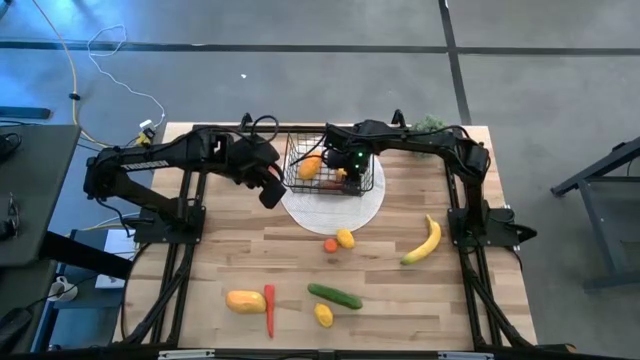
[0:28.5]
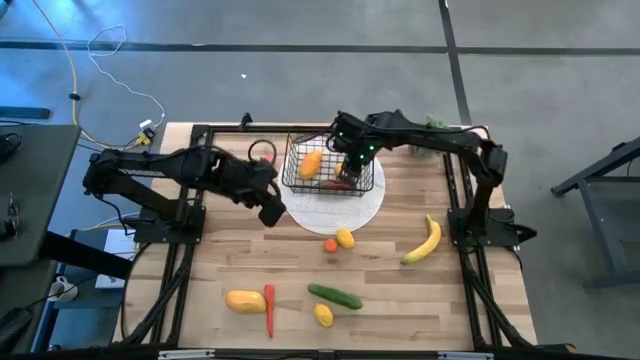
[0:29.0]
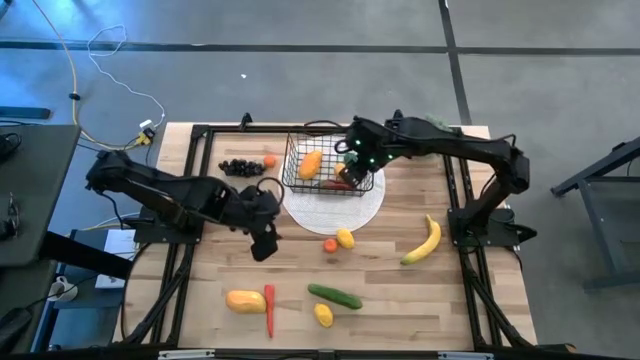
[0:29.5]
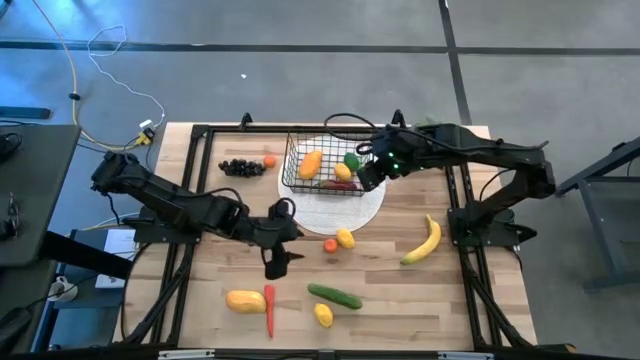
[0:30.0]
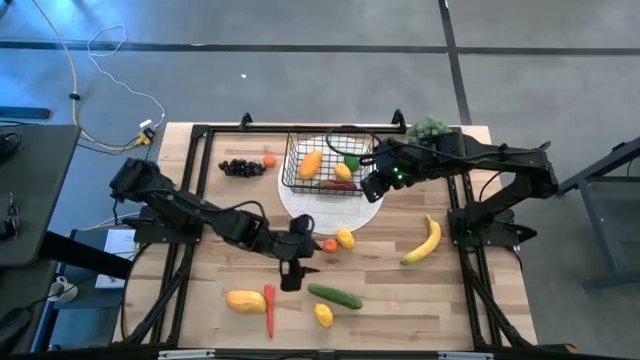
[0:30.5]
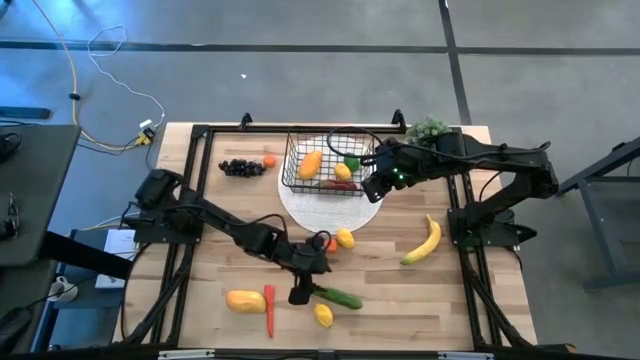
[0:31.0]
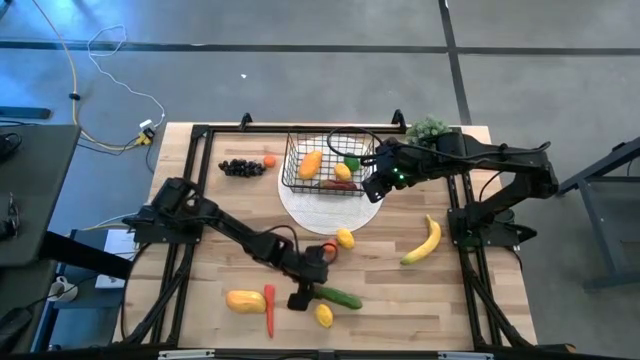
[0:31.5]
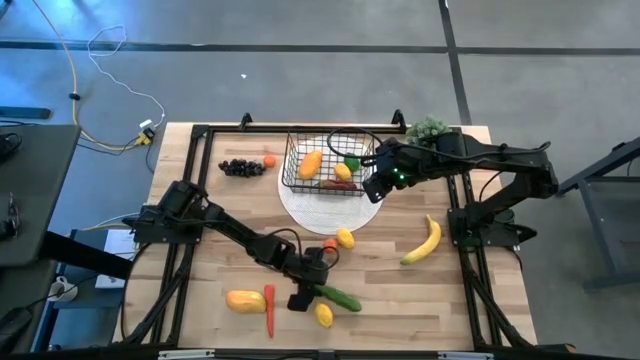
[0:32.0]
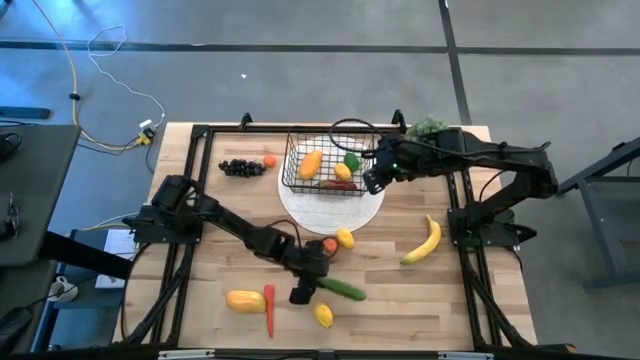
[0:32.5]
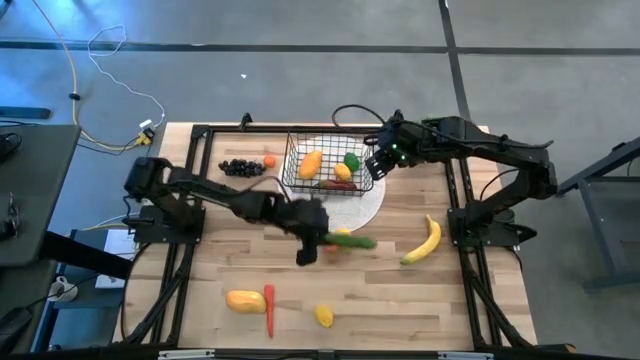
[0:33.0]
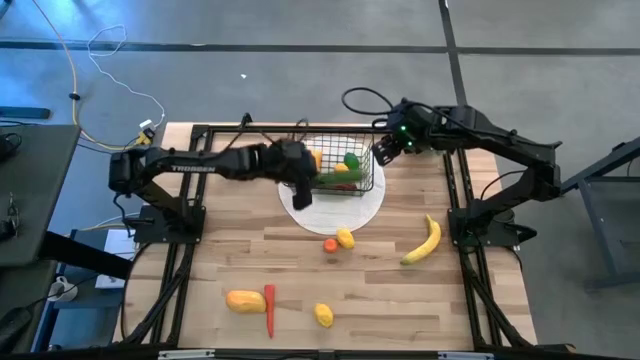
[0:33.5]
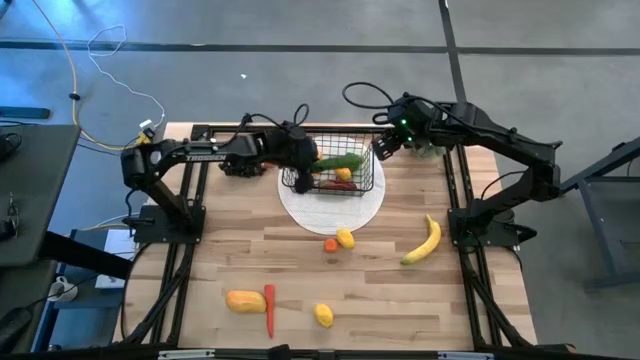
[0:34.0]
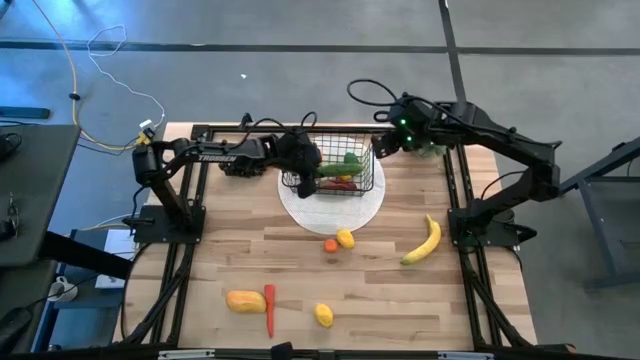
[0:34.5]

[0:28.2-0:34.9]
Task: Build produce basket
Put the green cucumber into the wire basket

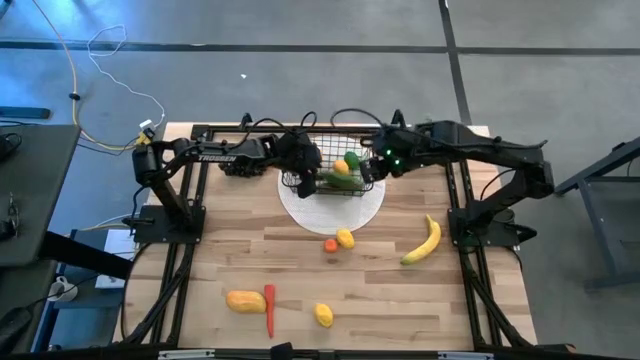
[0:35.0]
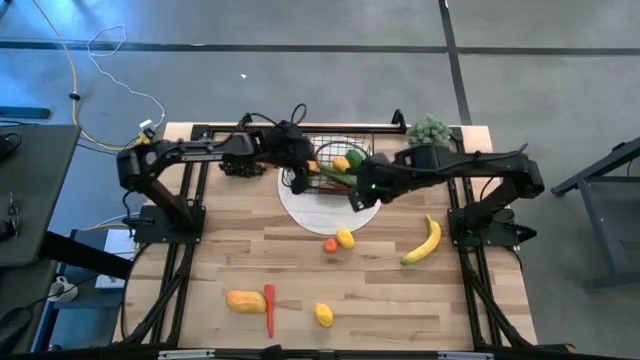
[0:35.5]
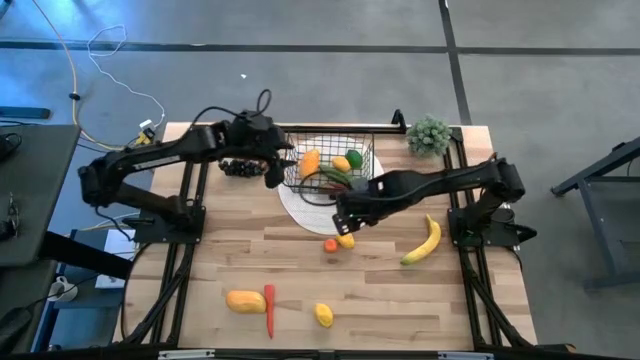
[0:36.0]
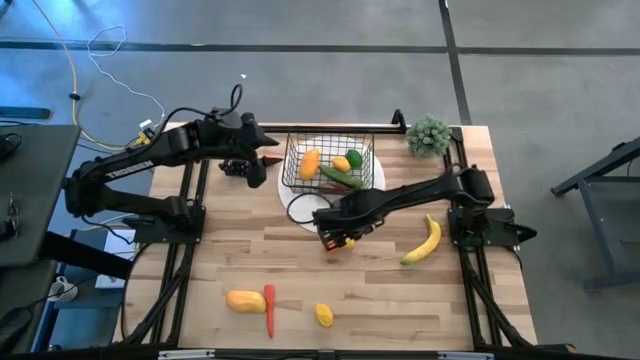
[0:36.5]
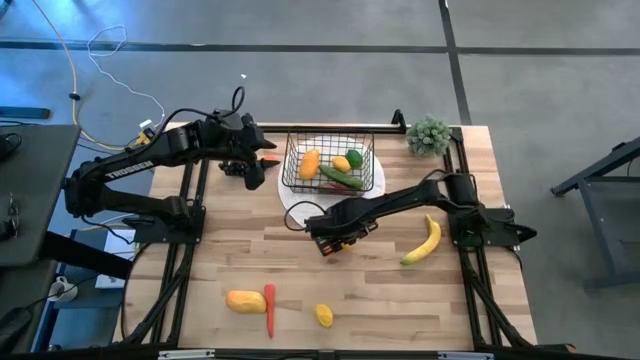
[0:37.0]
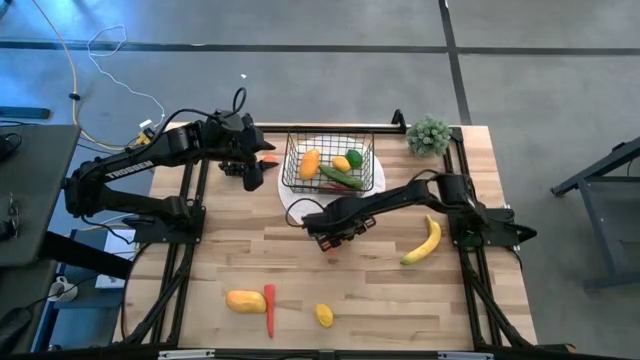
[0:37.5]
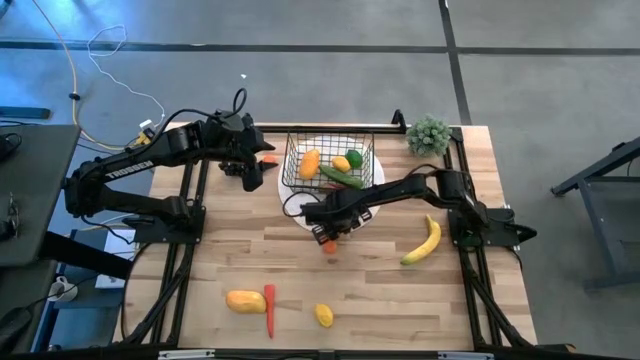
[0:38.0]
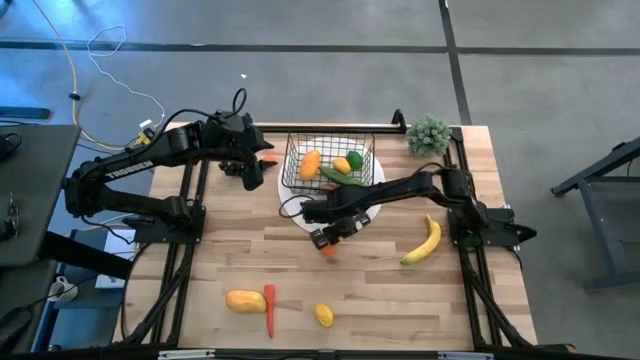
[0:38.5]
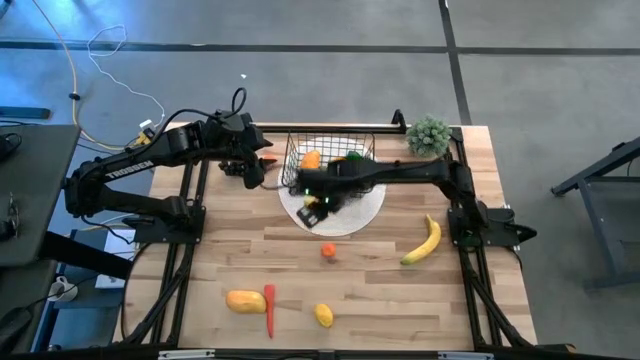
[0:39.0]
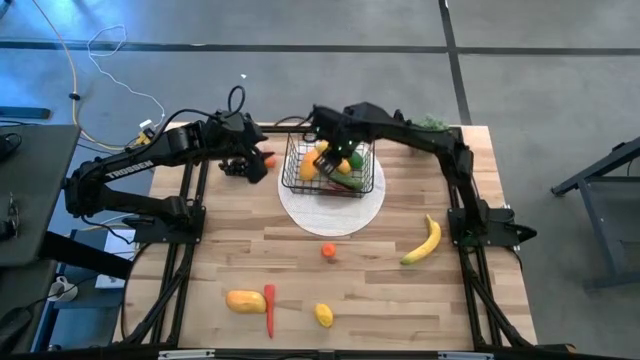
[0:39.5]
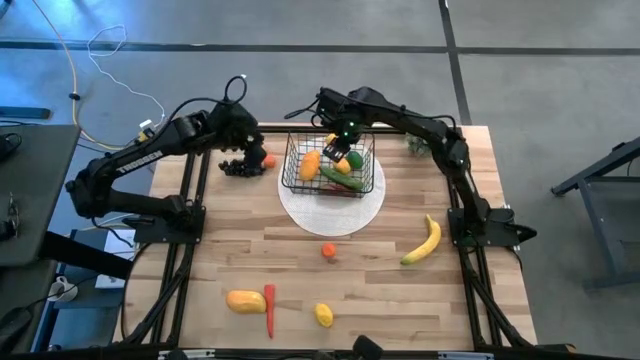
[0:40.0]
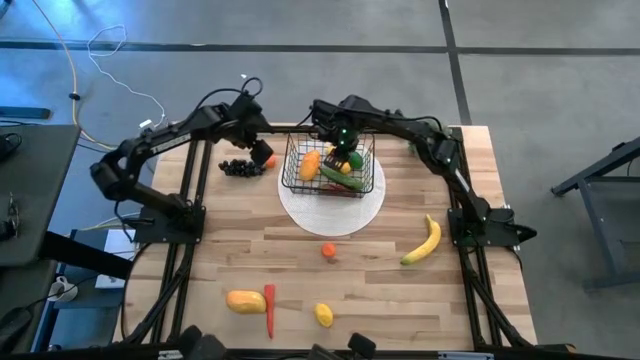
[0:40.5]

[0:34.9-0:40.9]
Put the top yellow lemon into the wire basket

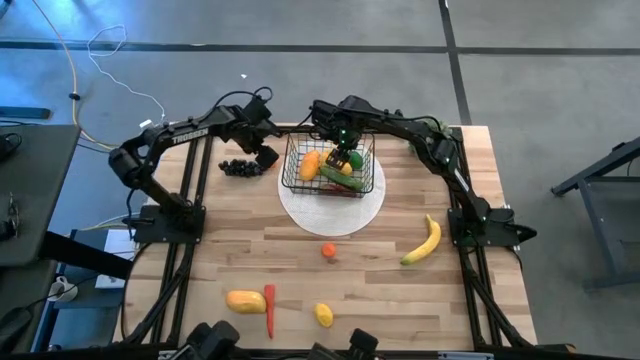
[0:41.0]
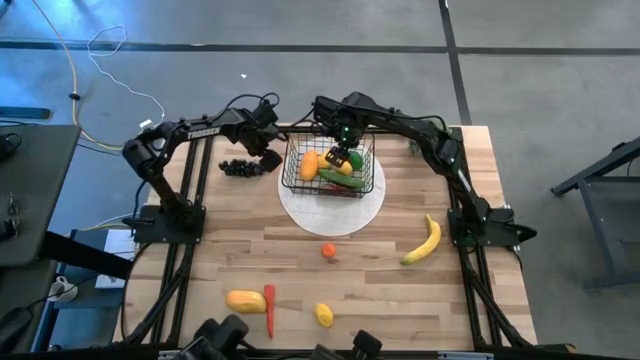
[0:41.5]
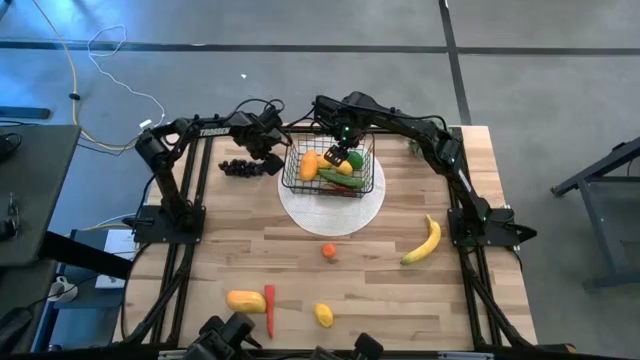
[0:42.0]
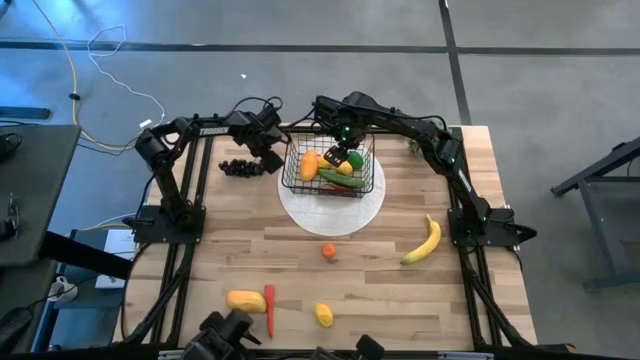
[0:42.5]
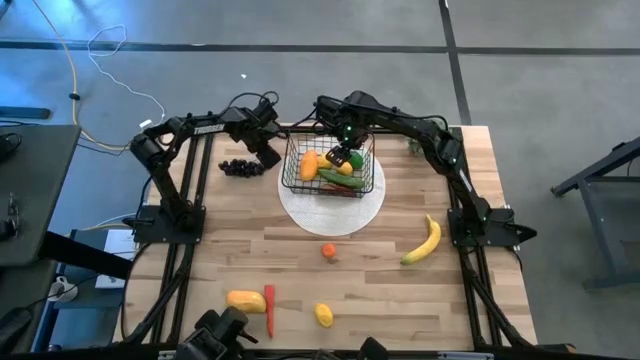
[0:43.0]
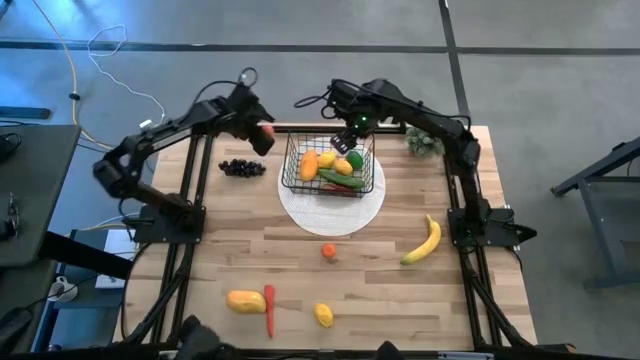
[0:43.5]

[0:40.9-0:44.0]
Put the top orange into the wire basket

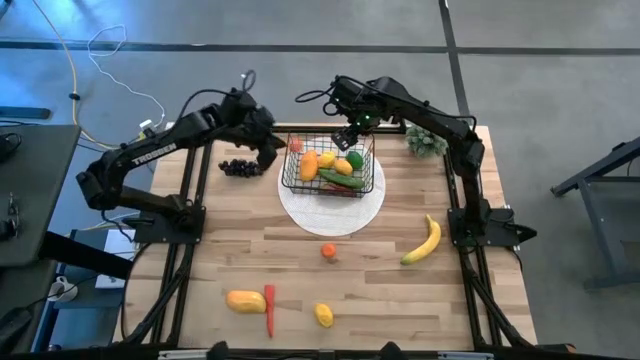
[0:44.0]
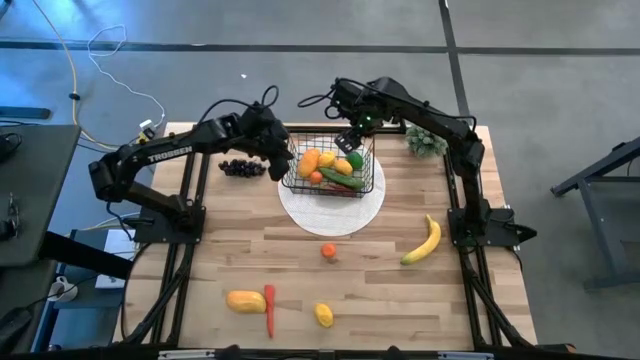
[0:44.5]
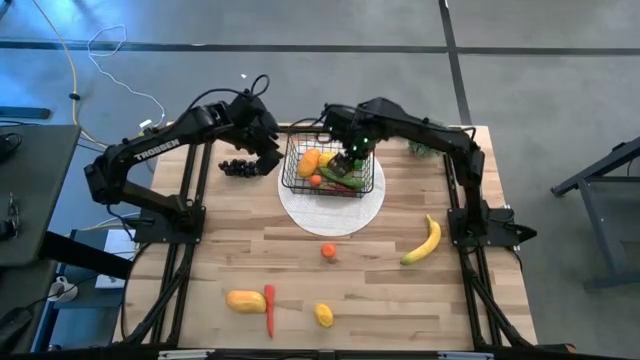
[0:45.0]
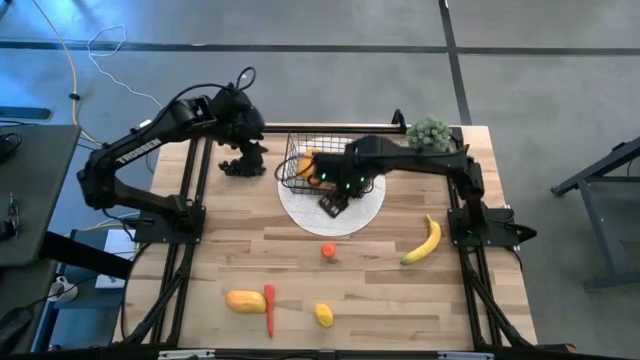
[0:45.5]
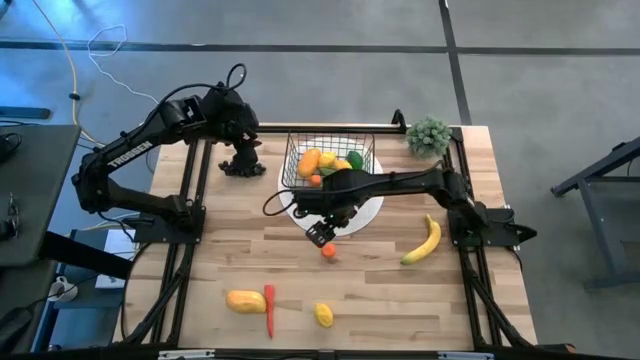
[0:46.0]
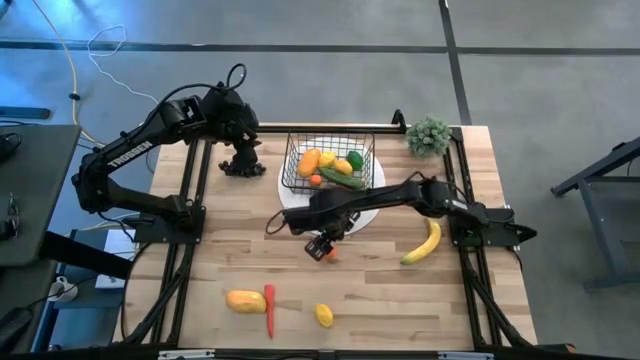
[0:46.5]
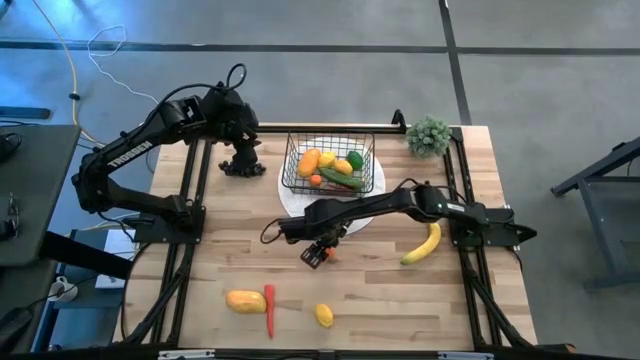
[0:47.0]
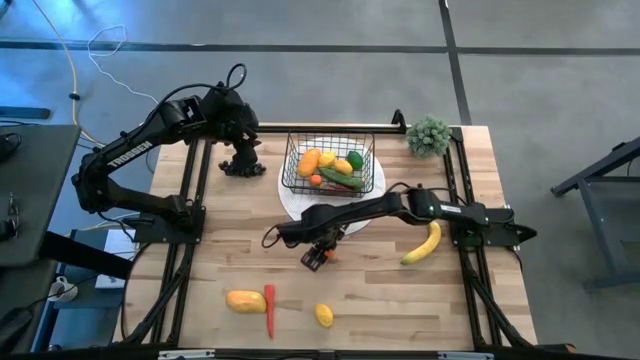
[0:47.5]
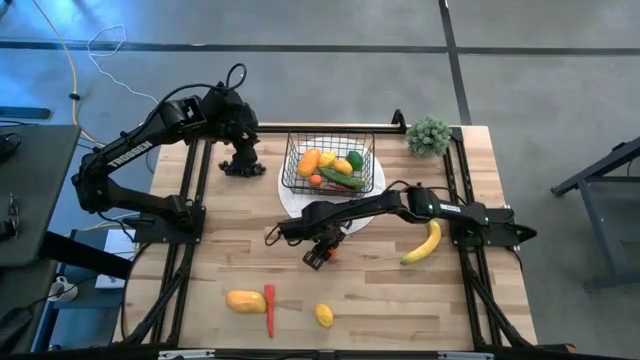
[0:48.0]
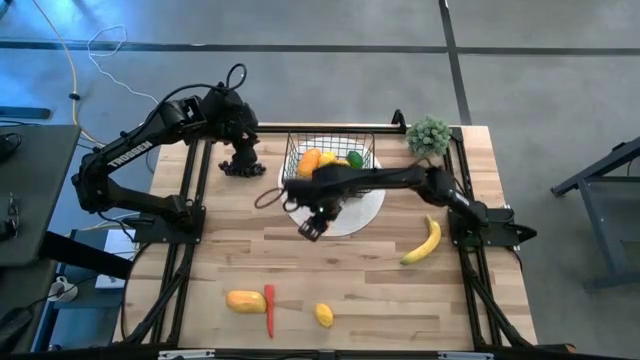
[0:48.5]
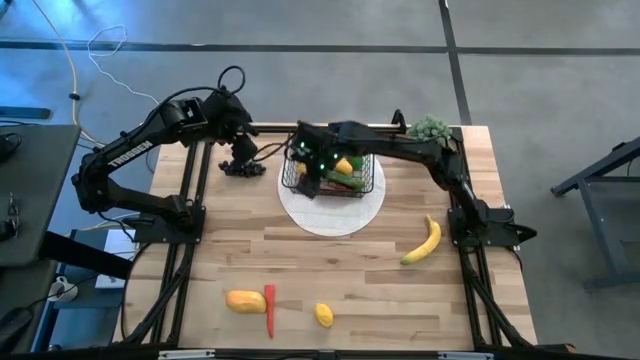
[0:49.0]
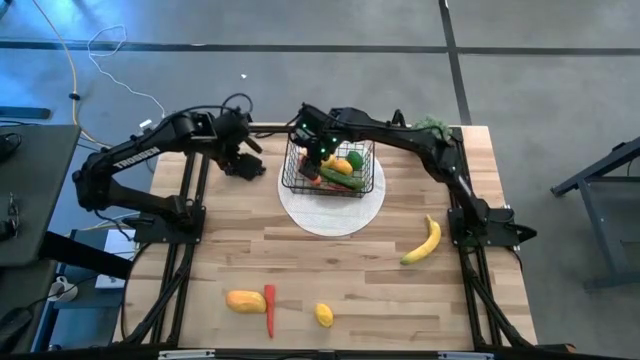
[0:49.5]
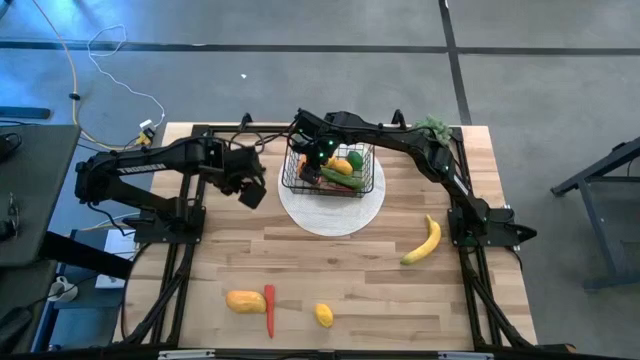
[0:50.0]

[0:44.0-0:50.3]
Put the orange into the wire basket
